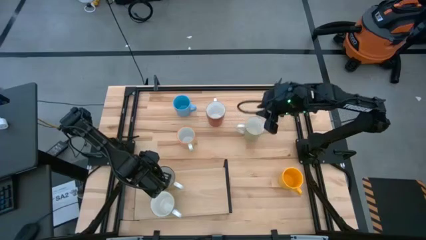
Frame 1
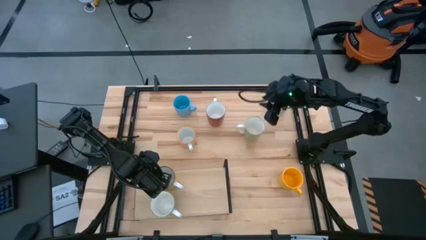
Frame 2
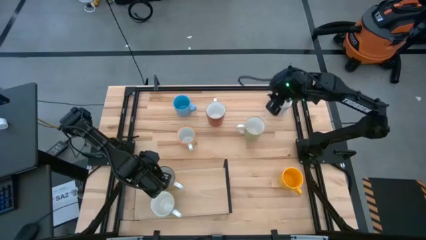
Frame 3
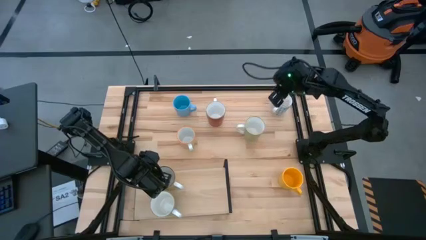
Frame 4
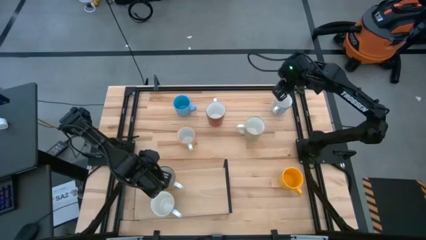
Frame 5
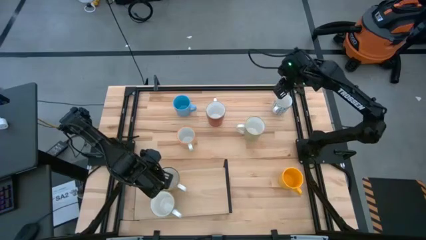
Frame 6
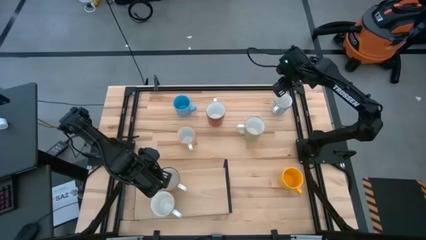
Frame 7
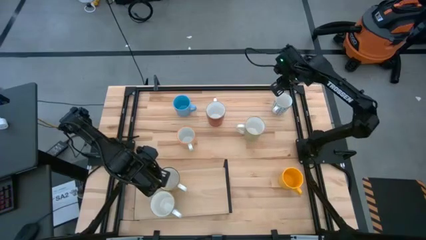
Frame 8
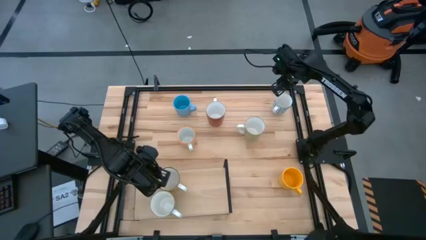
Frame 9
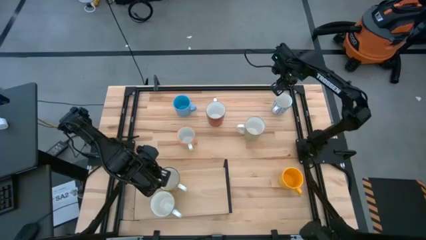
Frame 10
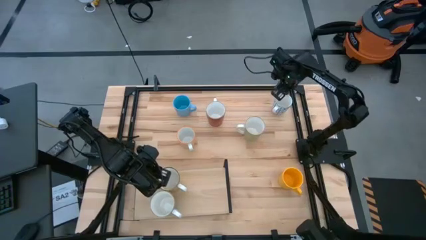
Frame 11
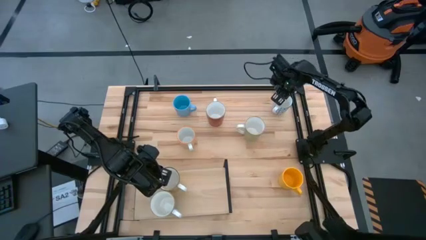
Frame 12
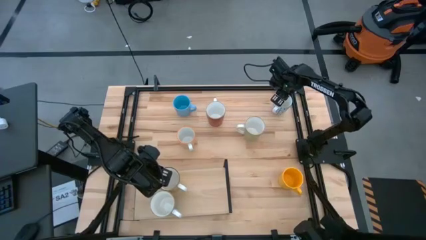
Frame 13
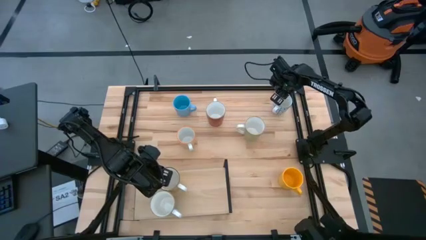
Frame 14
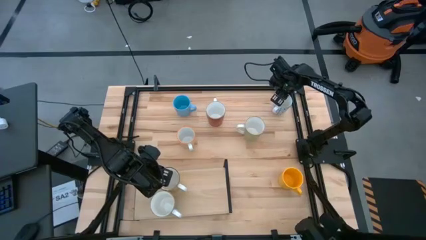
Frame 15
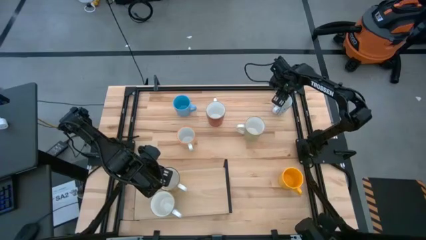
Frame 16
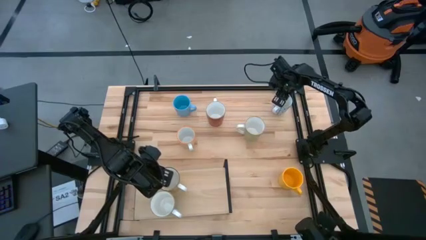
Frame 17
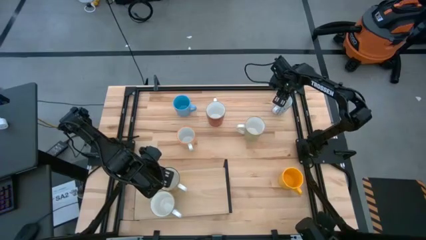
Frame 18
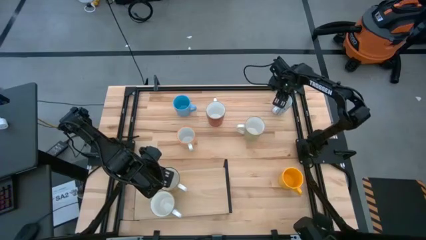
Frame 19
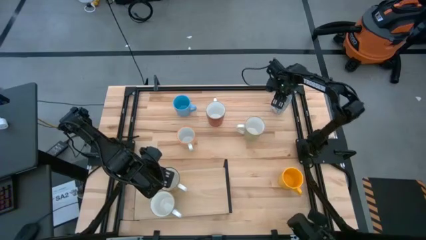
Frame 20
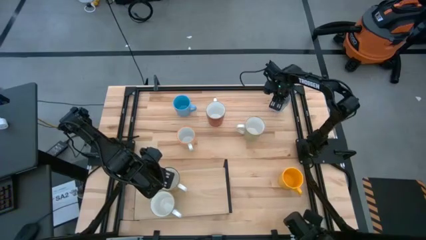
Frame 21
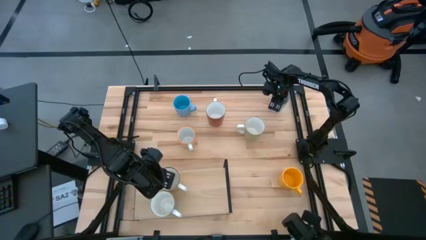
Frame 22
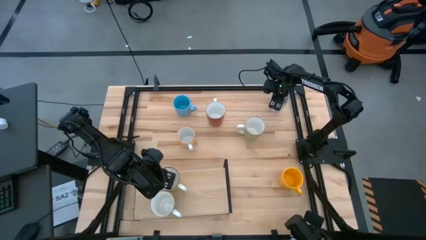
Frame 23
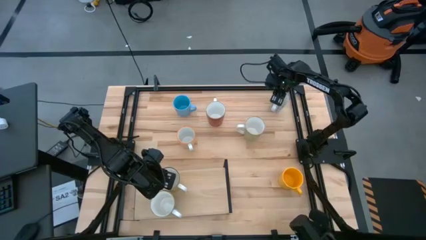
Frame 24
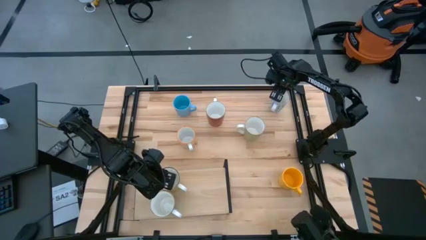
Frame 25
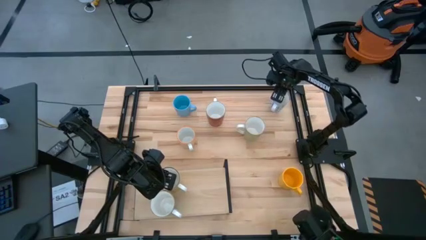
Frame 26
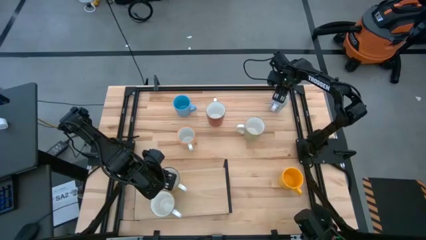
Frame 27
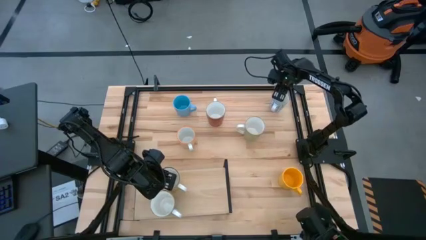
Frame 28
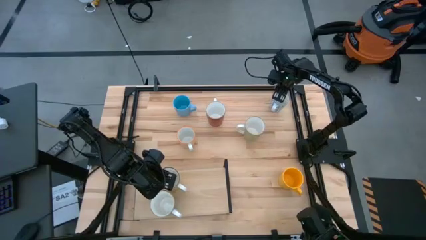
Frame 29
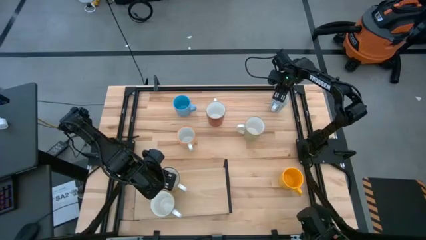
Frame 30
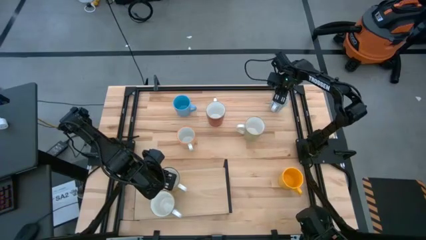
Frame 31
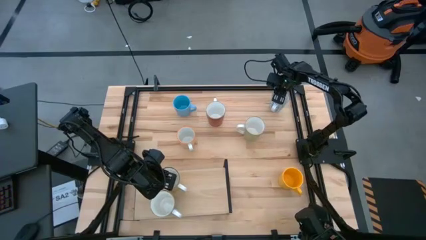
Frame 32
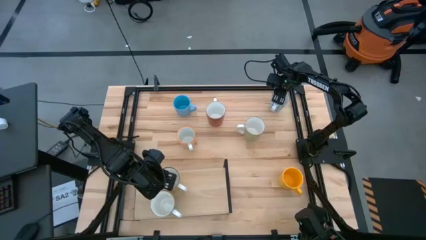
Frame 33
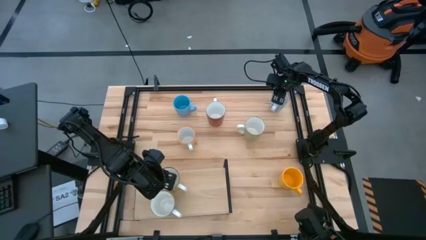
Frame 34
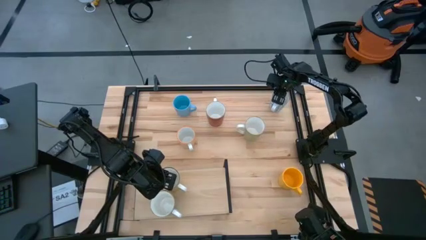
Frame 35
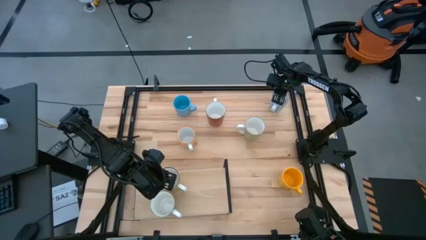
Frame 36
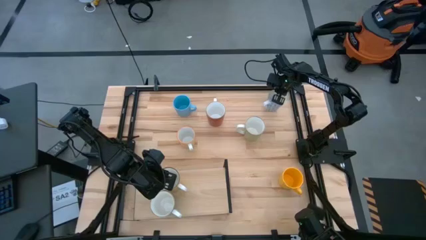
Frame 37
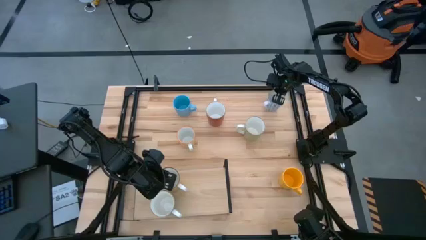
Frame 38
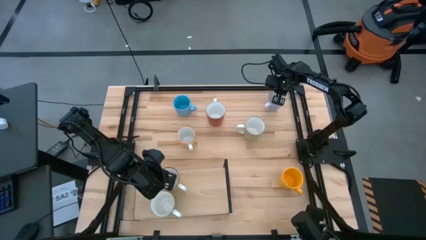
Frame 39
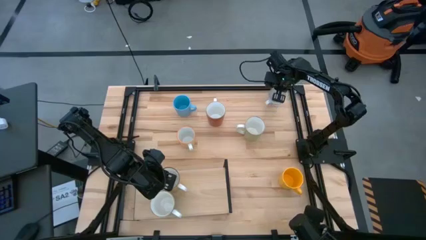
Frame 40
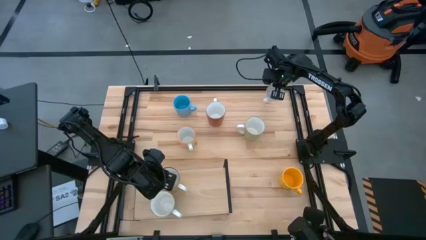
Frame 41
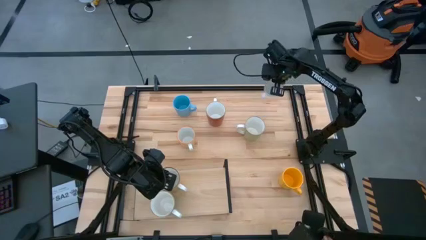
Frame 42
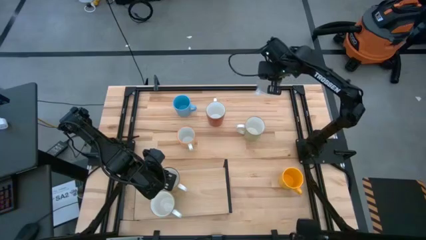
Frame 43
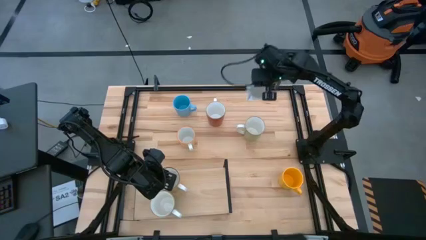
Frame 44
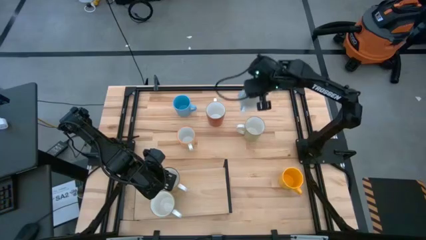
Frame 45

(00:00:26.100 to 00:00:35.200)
Task: Place coffee mugs
Put the blue patterned mug on the shelf

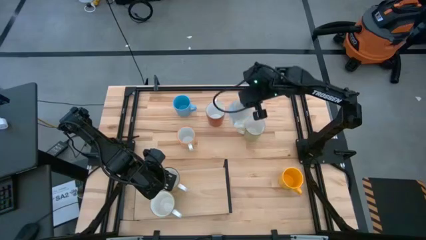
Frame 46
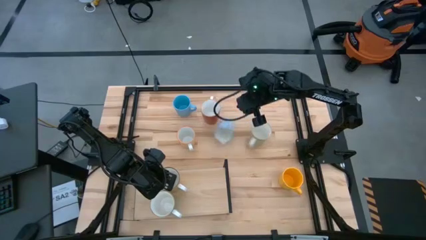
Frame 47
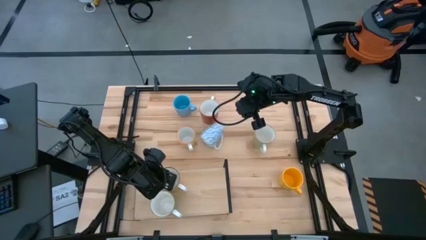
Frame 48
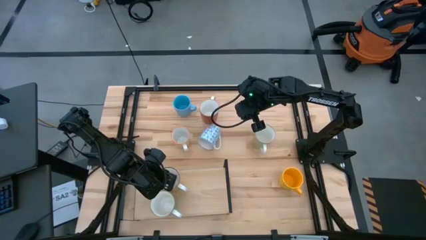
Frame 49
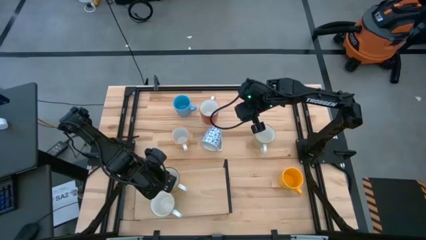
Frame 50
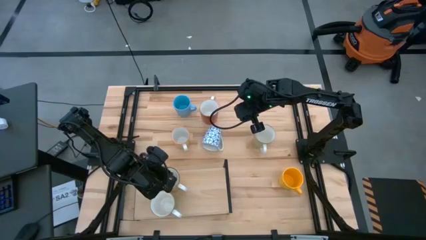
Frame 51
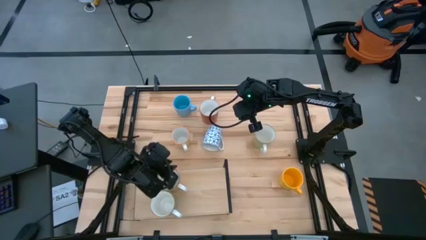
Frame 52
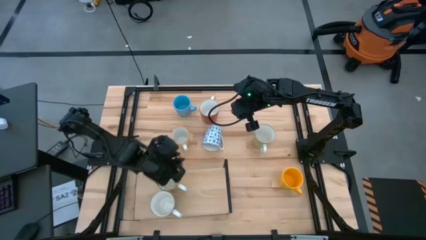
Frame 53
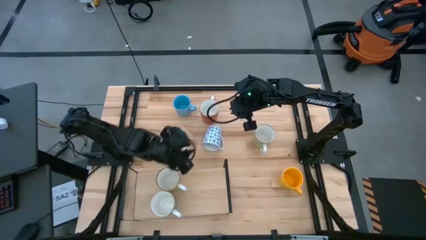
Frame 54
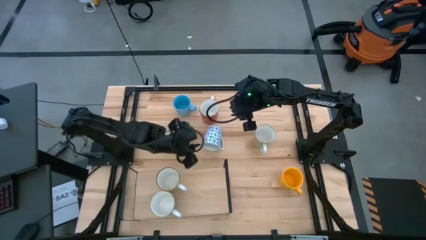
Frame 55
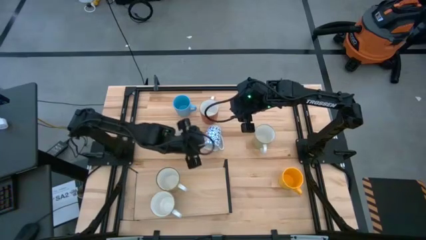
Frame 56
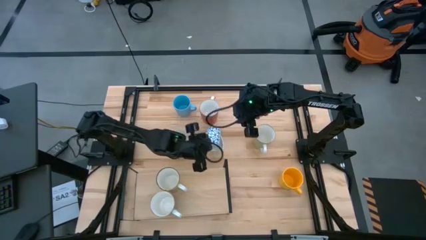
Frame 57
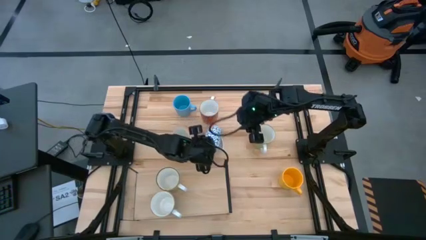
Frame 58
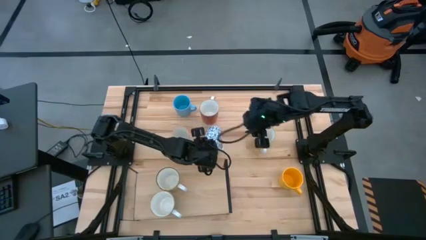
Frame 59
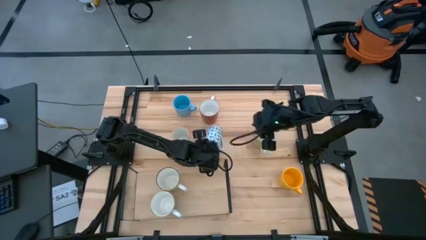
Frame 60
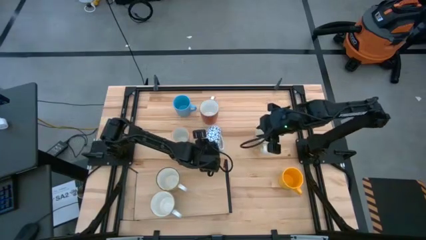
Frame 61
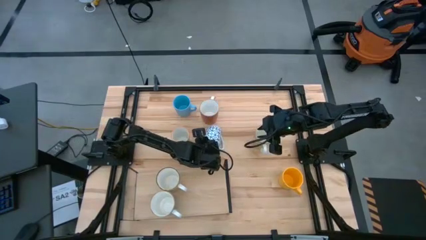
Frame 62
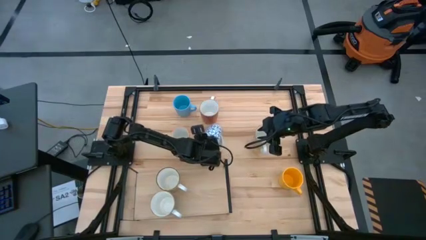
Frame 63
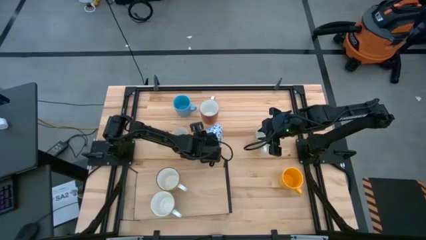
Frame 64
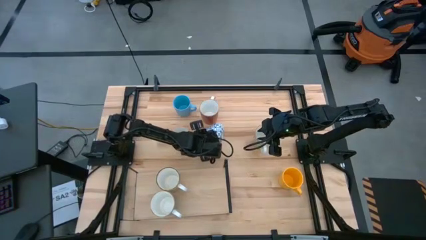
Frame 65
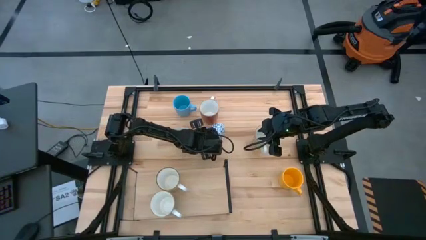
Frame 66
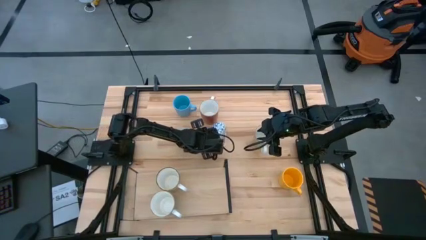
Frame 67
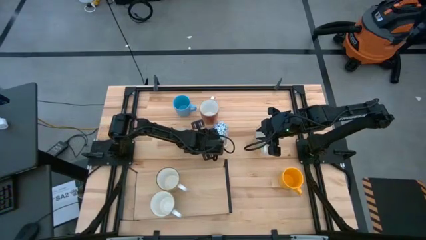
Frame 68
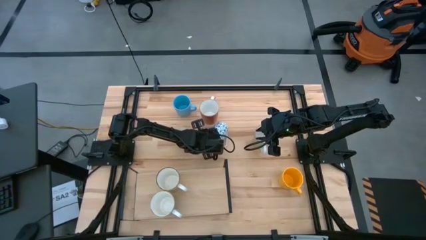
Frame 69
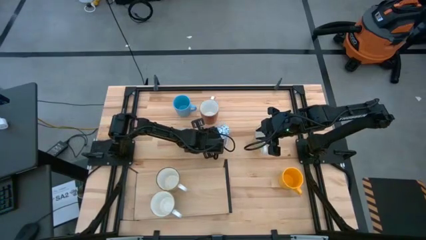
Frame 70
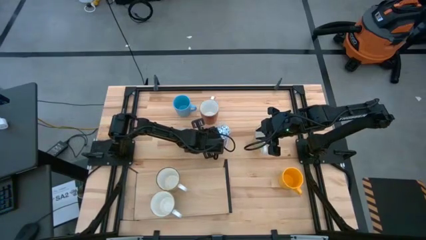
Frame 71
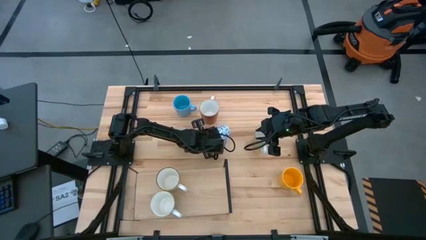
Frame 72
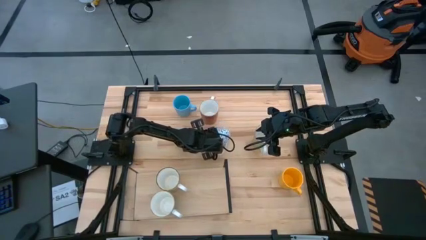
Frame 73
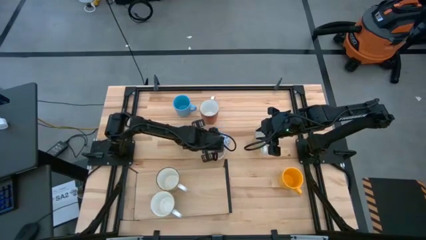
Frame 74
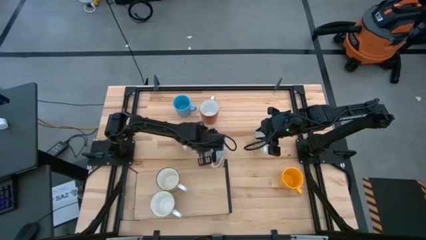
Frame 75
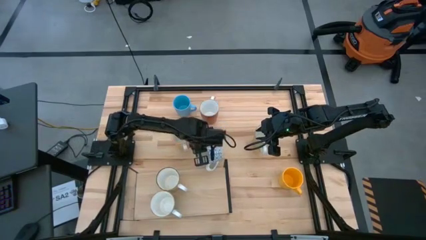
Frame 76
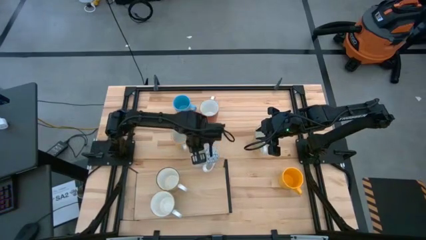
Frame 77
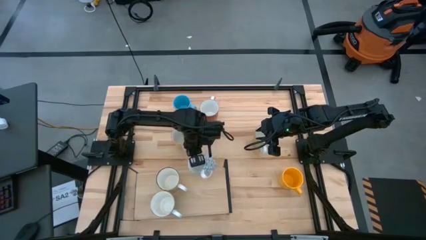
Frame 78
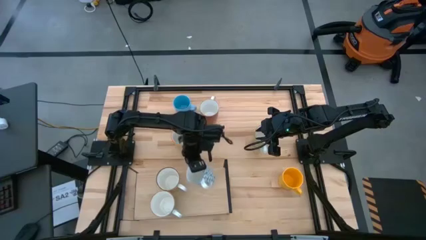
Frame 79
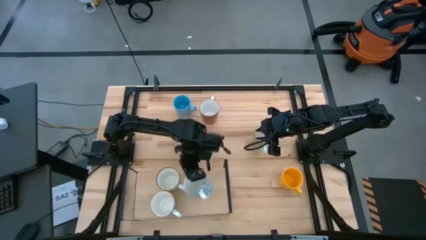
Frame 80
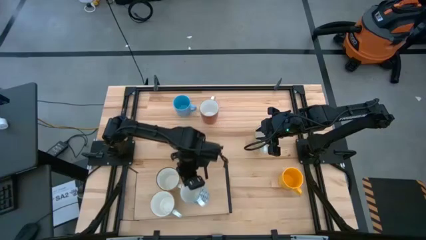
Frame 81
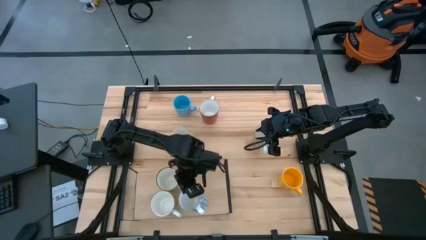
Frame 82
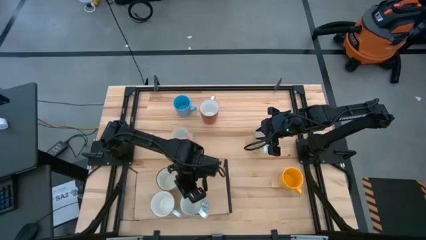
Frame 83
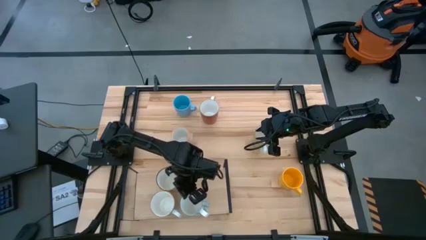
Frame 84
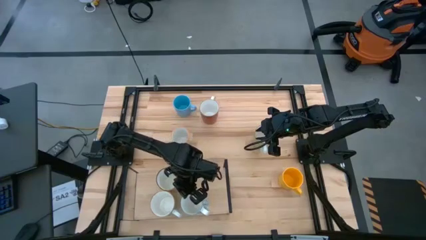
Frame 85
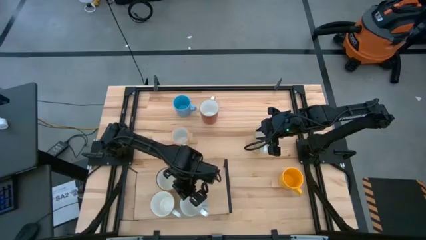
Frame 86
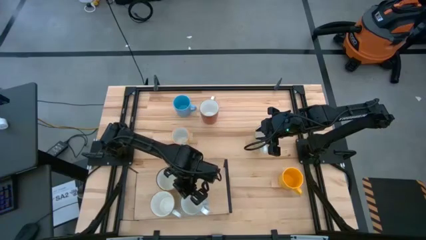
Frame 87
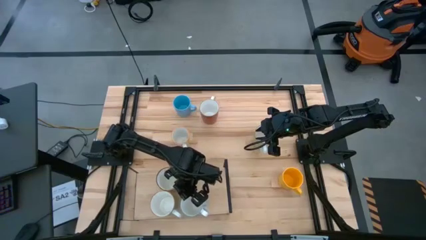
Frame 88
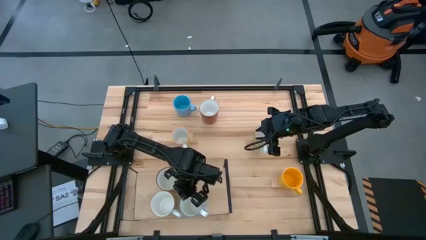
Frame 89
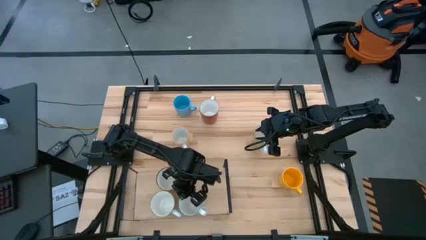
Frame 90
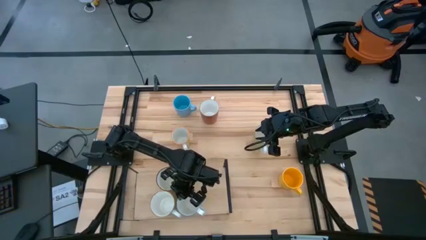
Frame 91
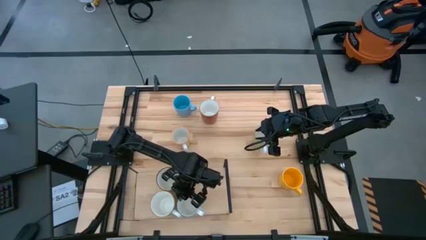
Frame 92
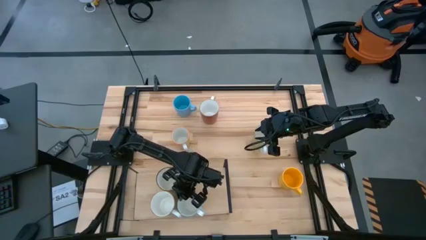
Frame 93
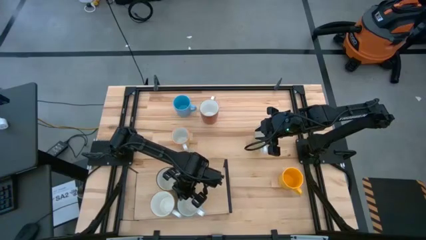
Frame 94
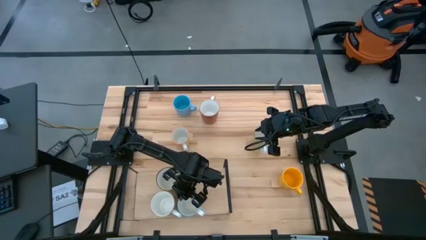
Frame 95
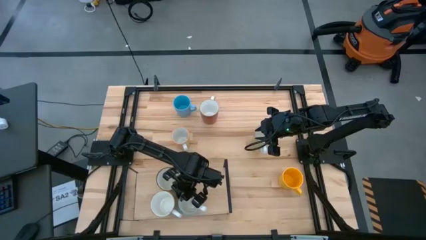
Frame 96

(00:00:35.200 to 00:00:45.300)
Put the blue patterned mug on the shelf
